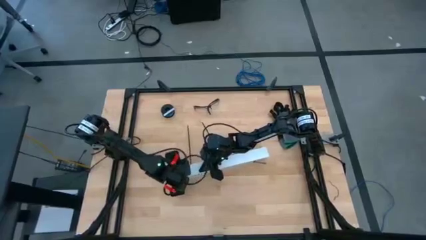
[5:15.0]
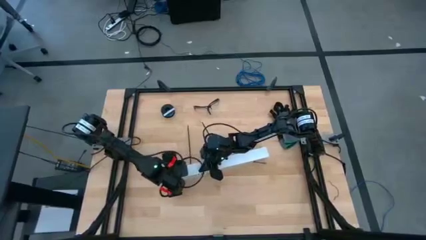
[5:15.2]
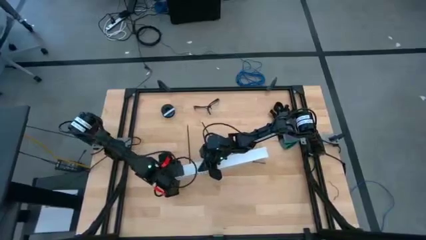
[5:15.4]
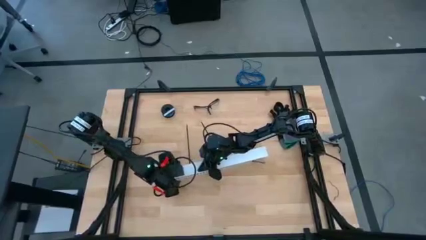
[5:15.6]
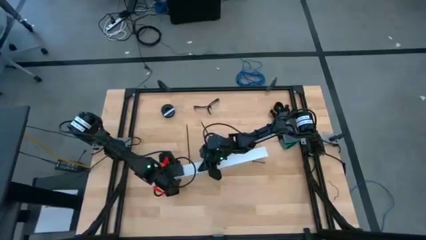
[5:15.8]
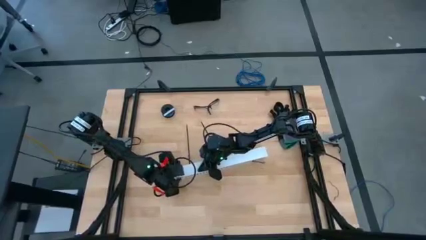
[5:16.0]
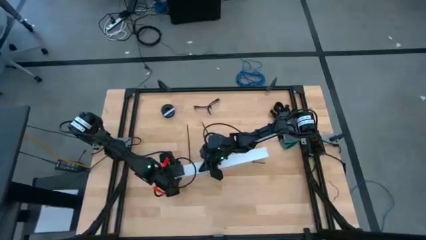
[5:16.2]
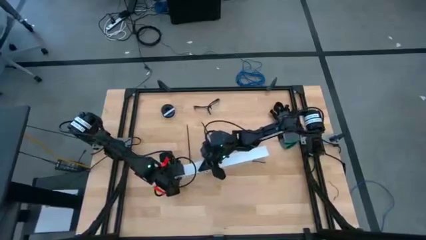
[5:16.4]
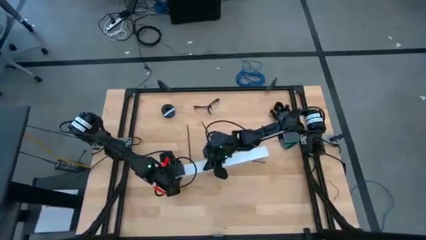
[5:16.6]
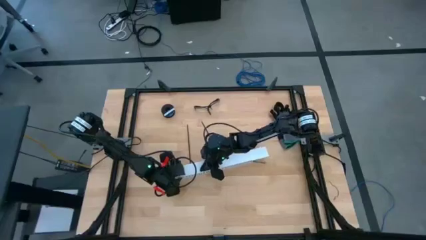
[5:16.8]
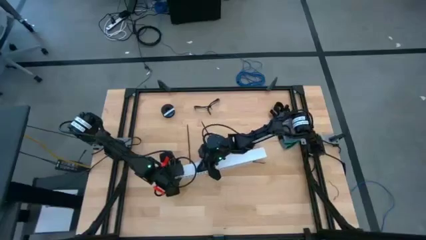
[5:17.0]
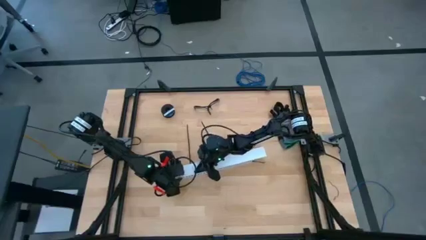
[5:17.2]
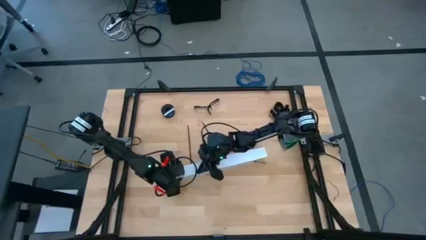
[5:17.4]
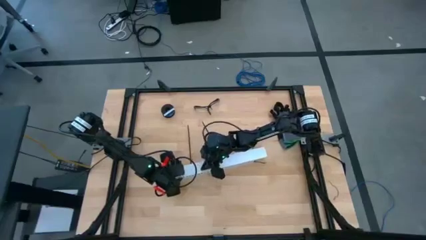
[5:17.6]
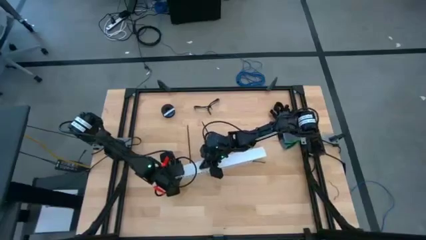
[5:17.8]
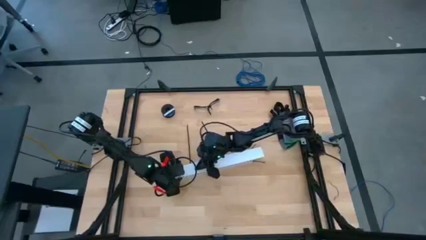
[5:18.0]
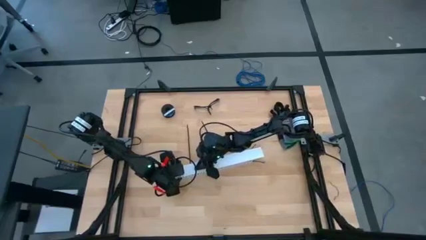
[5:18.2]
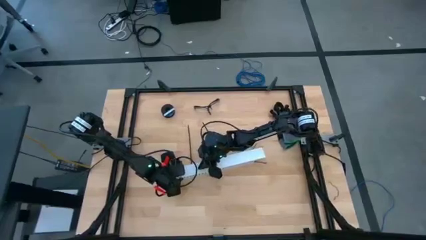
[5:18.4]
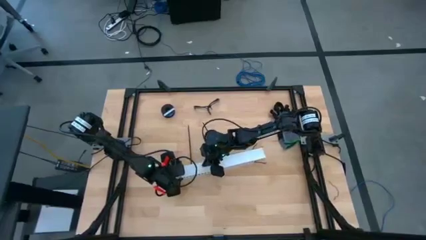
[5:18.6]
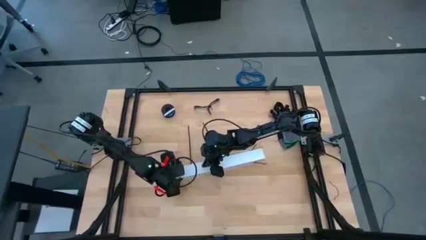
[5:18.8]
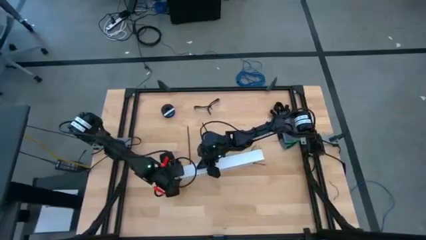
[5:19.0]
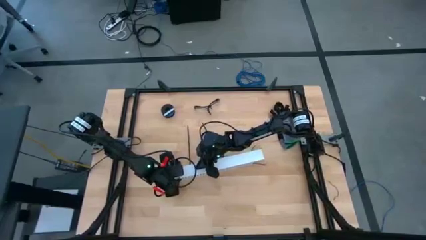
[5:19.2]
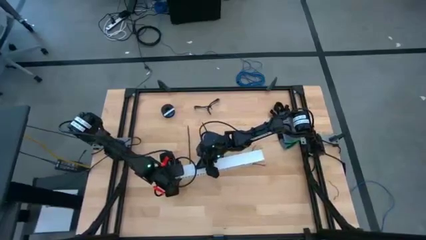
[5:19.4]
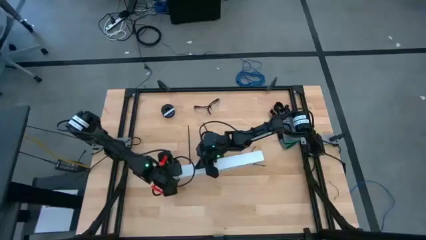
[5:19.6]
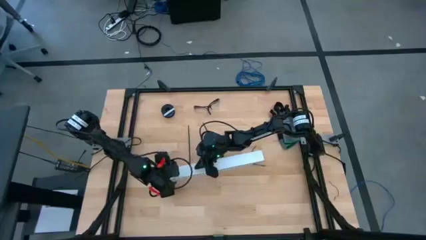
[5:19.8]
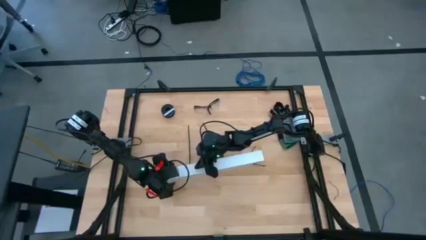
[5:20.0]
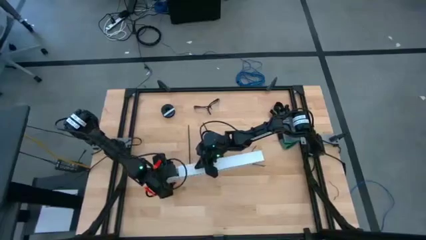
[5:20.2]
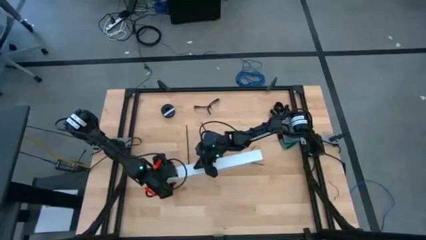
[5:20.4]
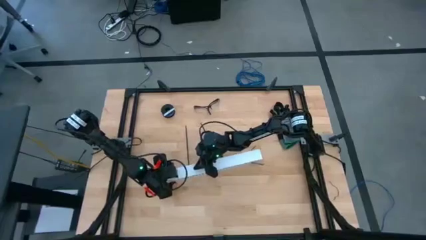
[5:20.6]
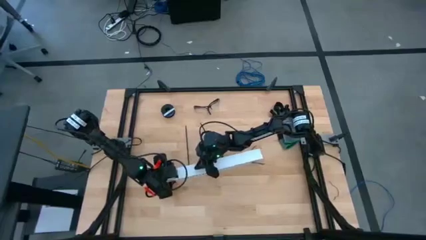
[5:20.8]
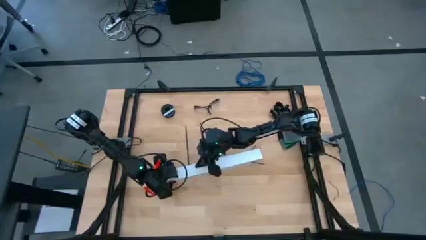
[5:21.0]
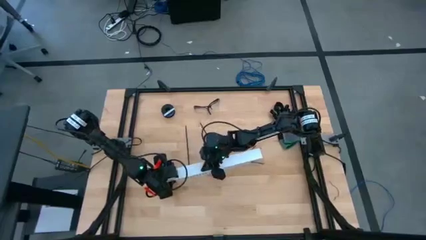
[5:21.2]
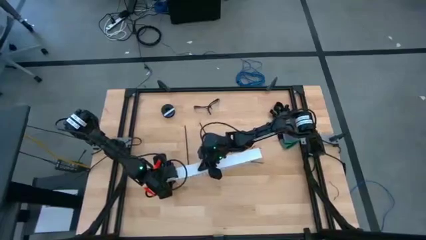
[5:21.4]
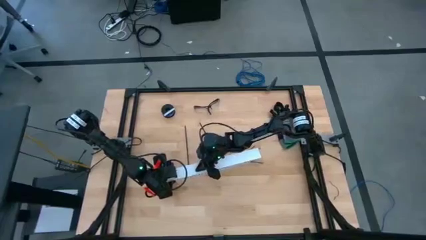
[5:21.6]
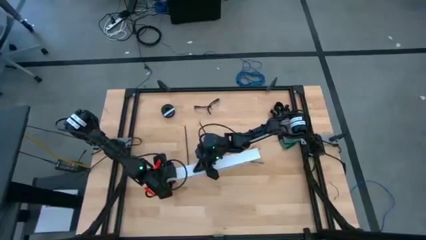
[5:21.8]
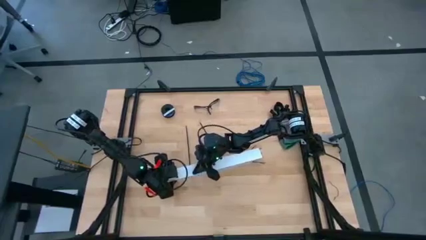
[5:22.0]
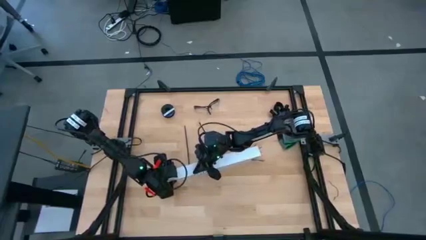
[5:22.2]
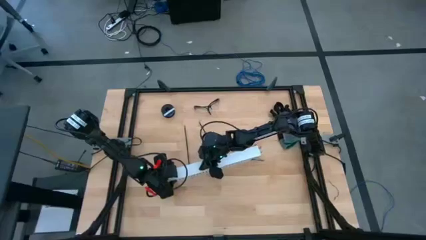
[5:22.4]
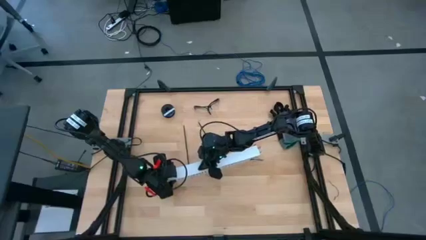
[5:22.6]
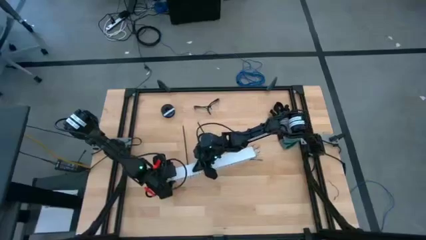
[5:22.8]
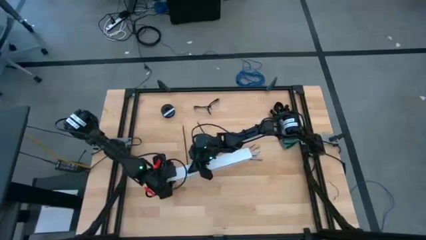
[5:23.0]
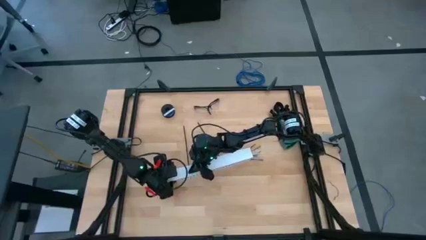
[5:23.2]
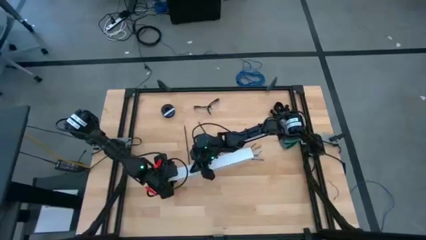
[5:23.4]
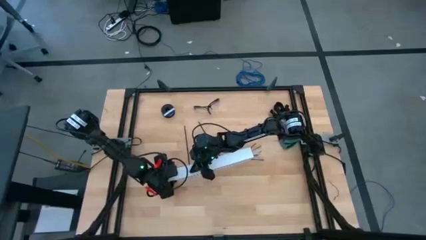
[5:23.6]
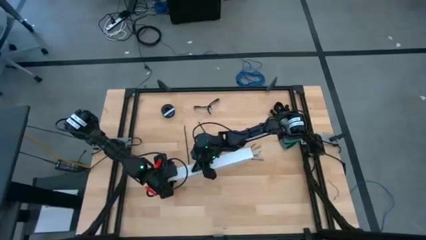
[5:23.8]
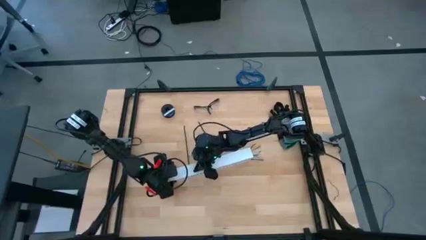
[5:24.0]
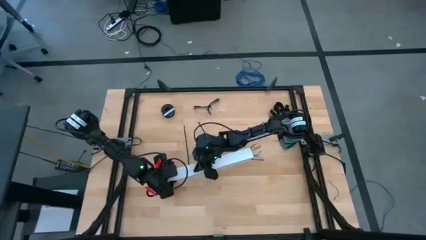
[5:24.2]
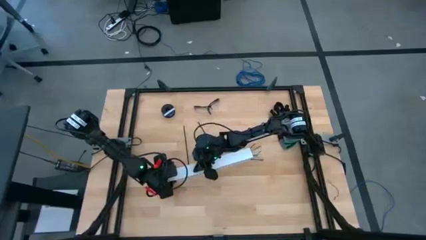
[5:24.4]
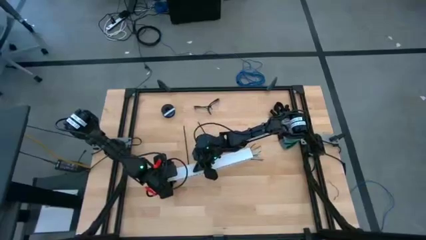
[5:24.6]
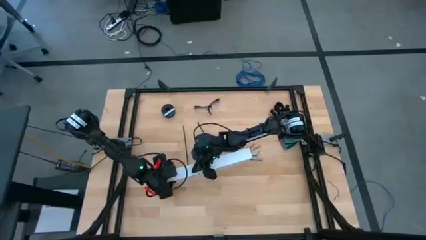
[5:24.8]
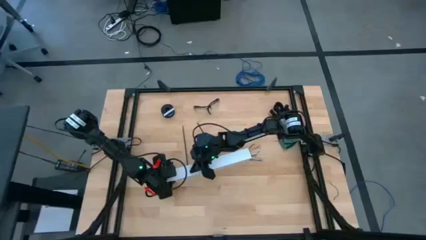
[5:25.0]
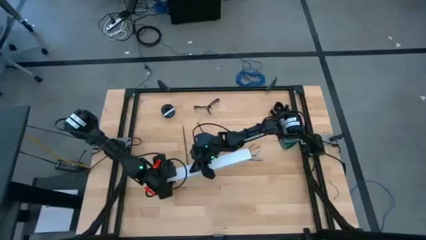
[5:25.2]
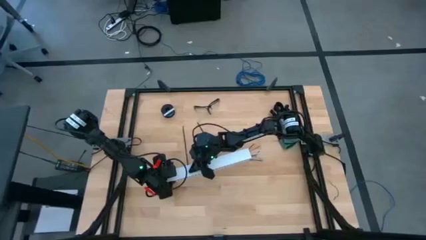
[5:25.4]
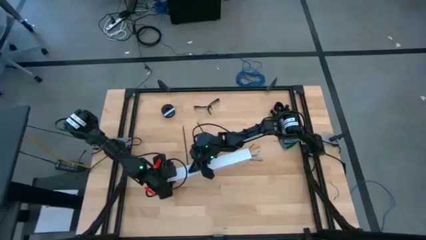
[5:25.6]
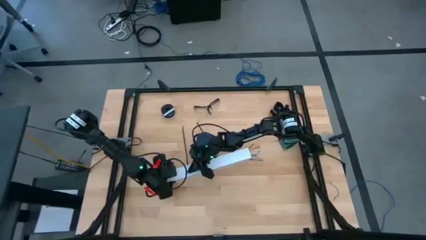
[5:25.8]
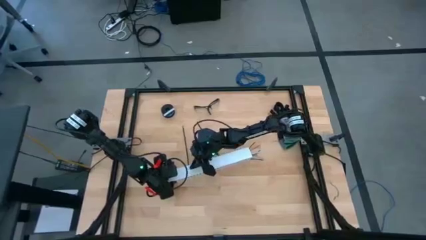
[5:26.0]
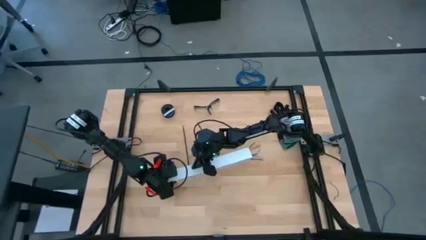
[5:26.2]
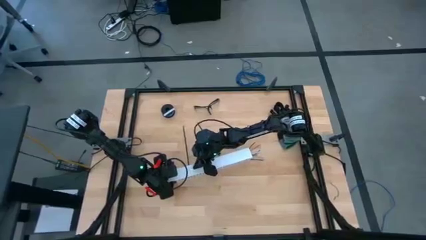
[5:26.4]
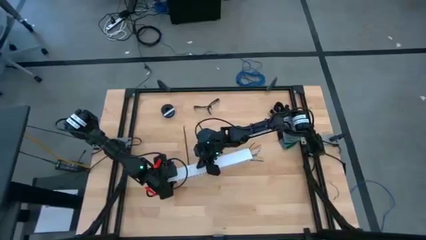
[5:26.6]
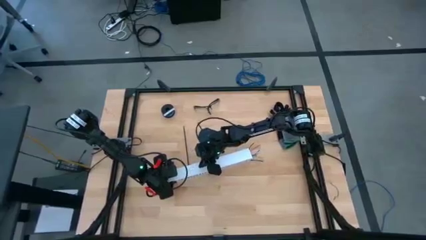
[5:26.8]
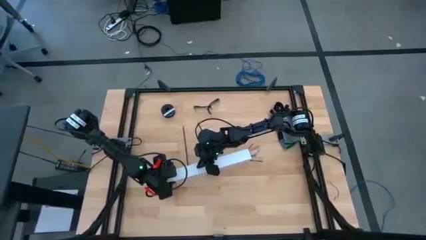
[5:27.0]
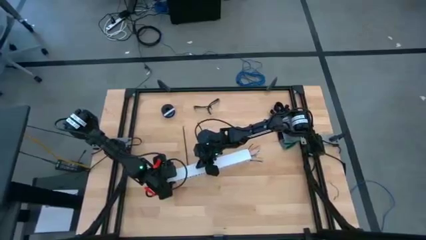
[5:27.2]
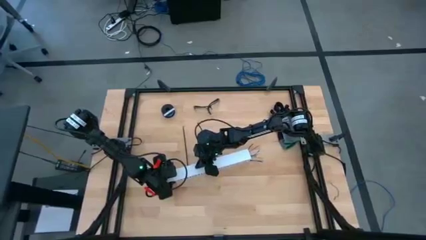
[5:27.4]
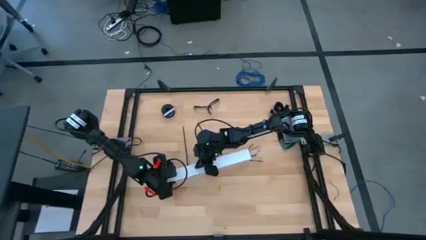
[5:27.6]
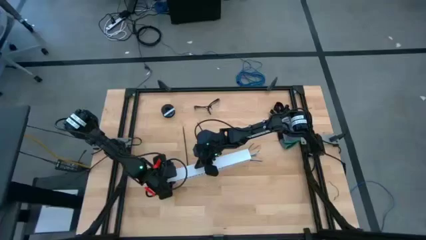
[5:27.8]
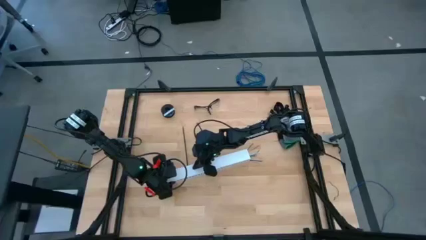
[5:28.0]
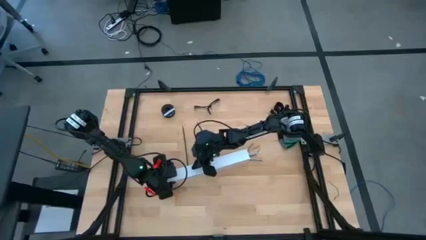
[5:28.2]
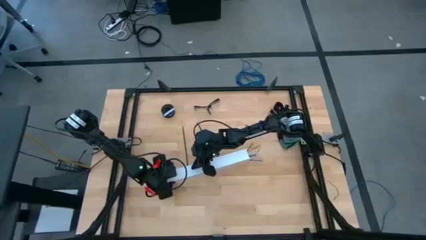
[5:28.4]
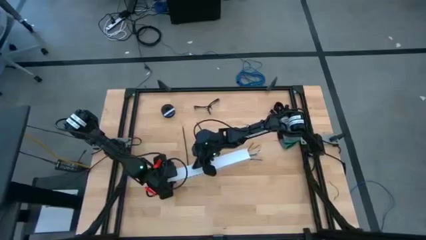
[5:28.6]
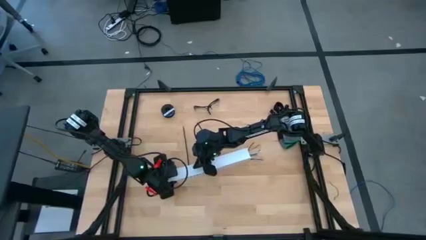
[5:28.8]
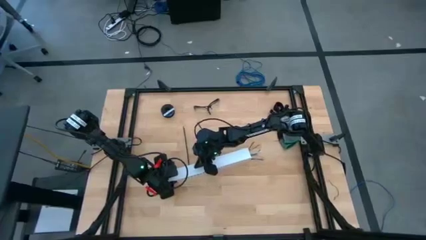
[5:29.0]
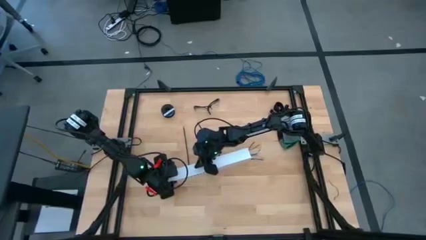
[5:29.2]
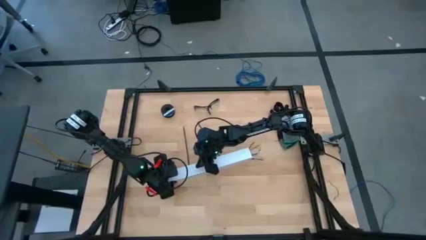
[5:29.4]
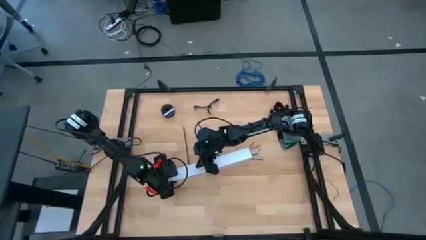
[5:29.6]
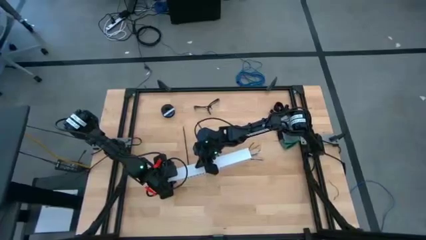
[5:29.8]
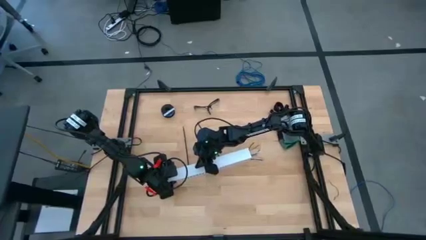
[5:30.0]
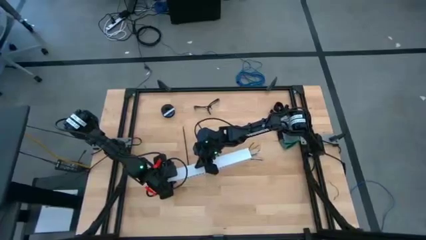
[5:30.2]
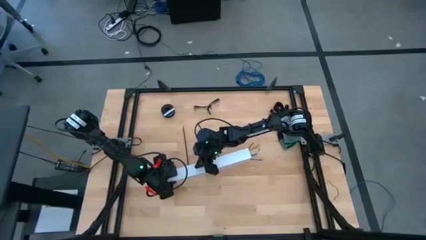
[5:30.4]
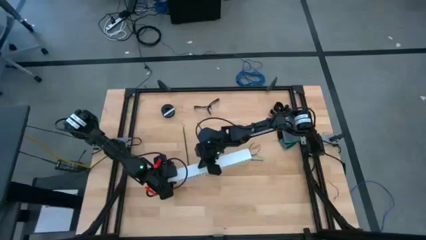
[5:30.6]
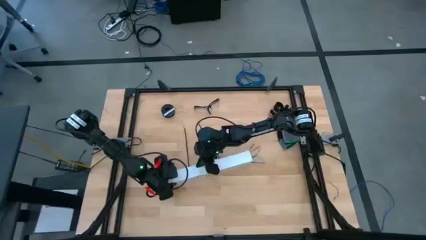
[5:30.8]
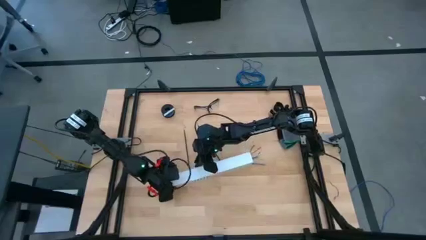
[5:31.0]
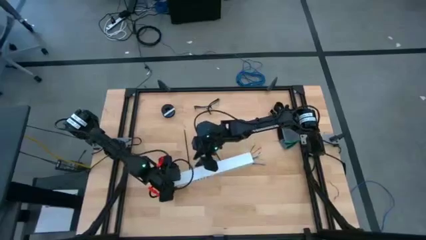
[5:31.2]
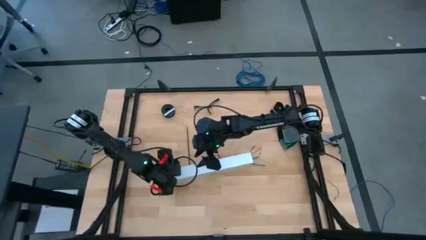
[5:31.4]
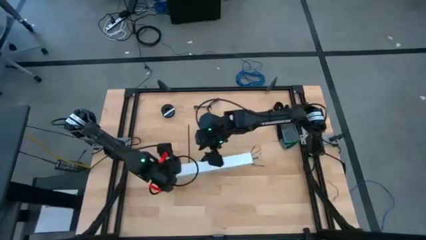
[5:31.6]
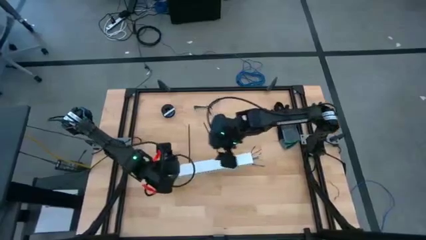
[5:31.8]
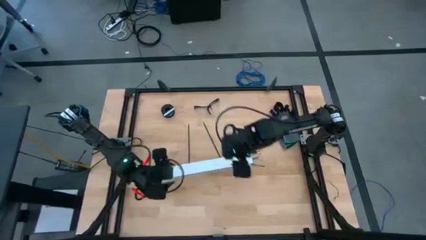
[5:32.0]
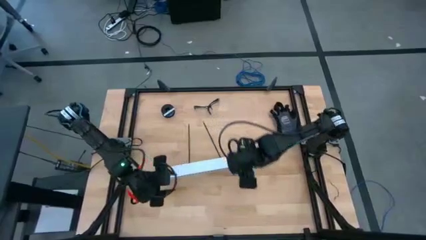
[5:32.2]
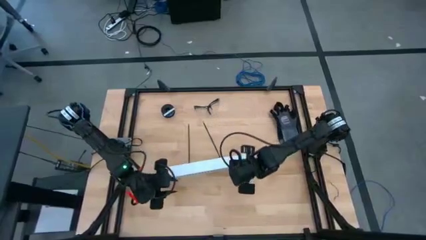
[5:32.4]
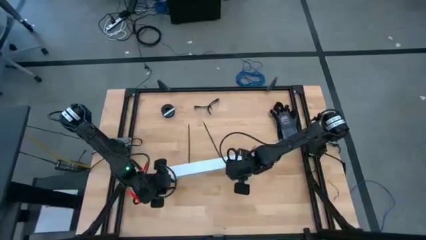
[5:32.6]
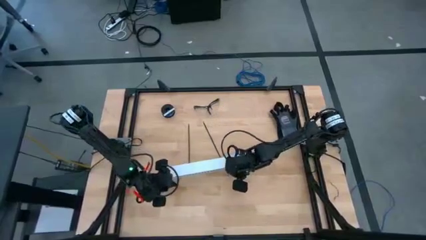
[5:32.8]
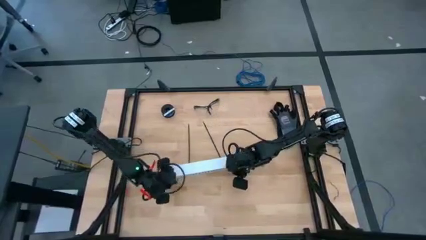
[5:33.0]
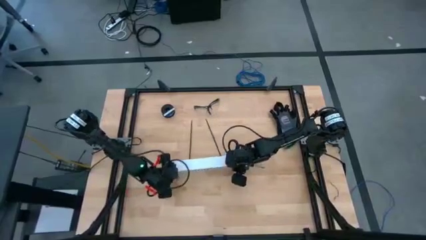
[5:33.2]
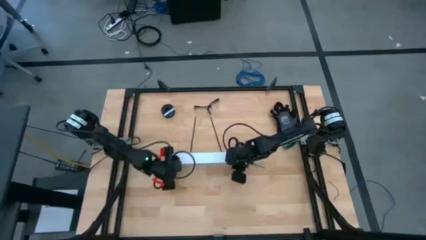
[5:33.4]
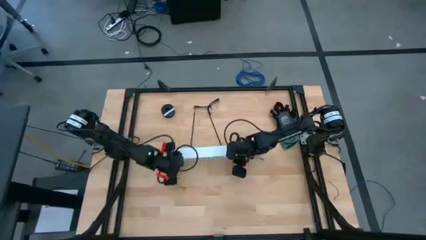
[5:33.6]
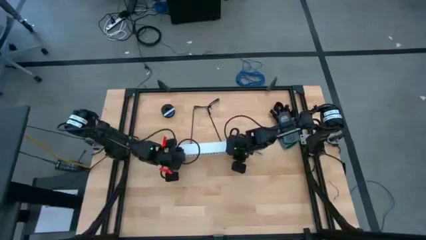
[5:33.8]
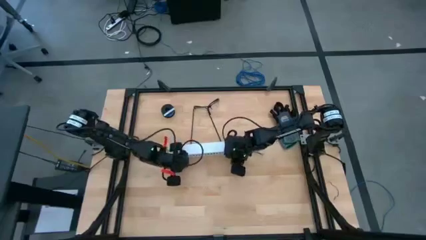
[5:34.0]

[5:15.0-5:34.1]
Task: Ziptie cables
Close the white cable duct
